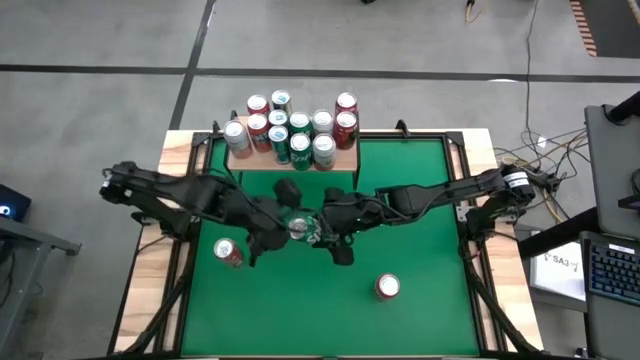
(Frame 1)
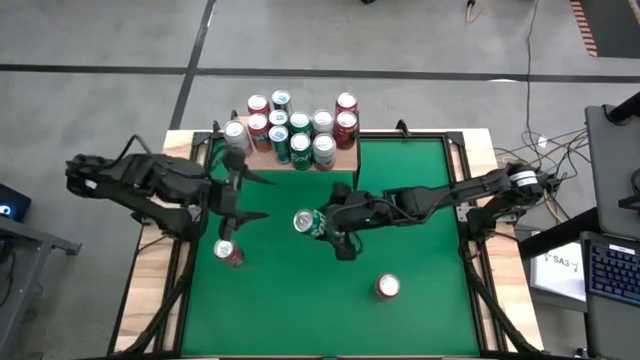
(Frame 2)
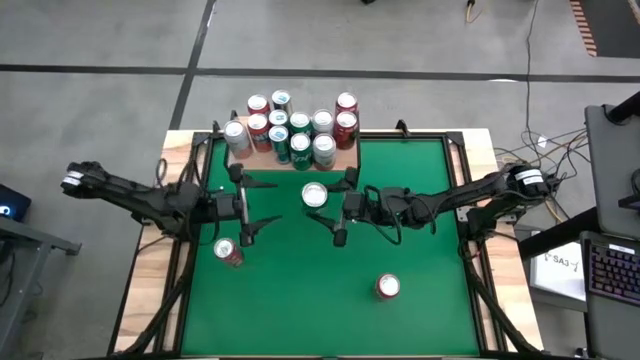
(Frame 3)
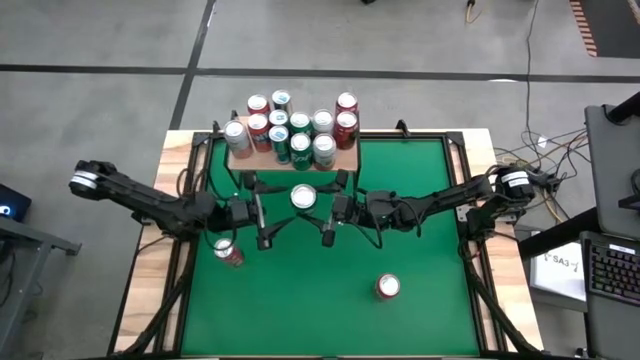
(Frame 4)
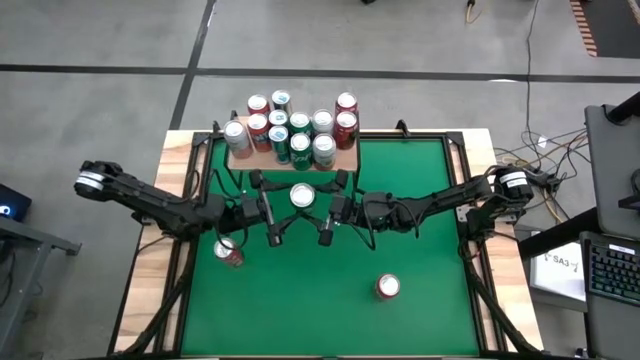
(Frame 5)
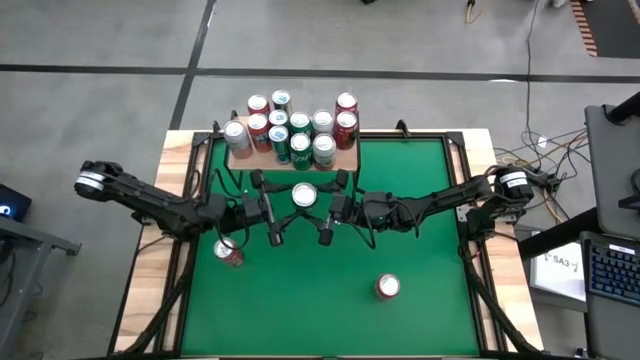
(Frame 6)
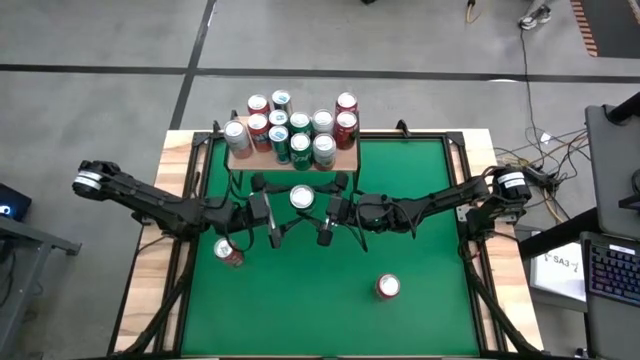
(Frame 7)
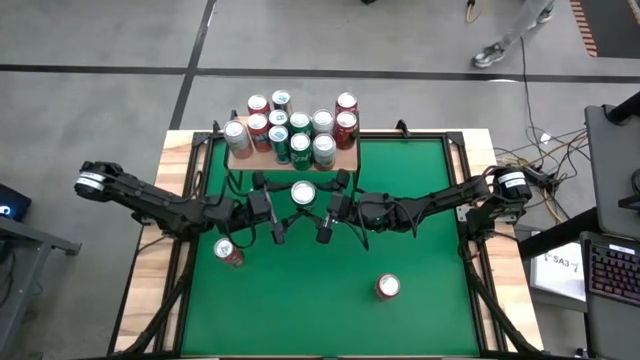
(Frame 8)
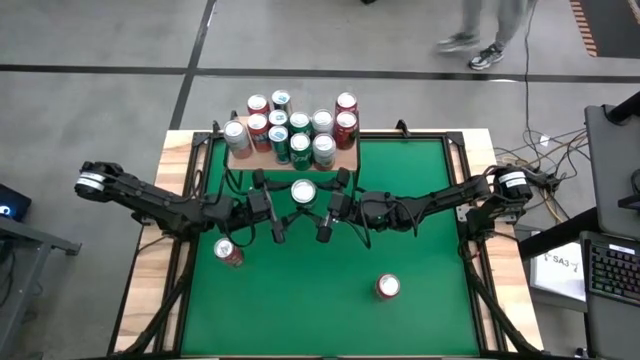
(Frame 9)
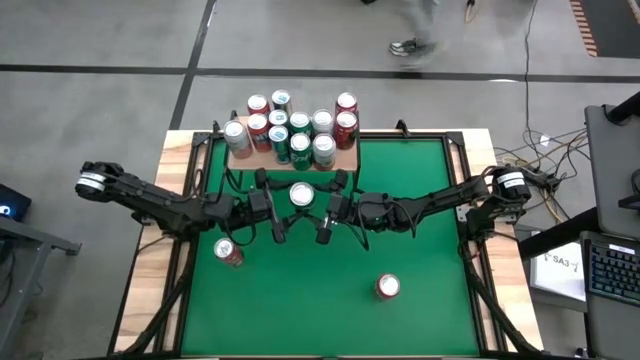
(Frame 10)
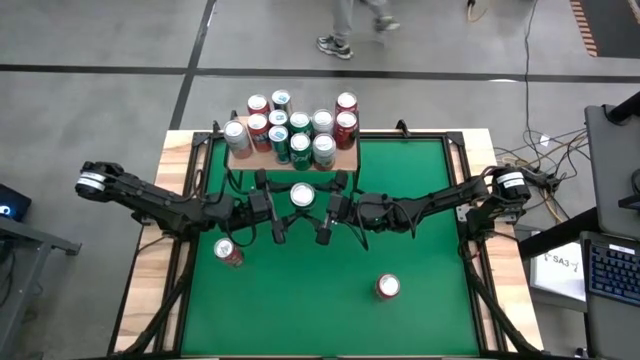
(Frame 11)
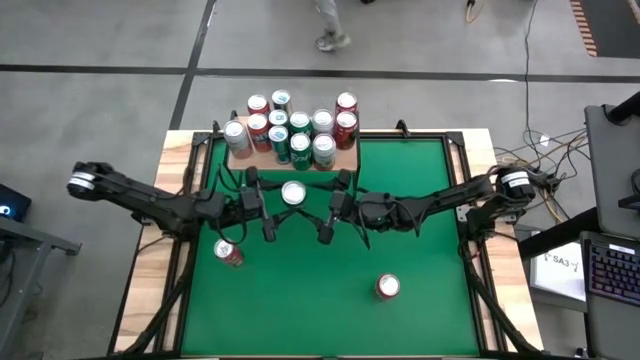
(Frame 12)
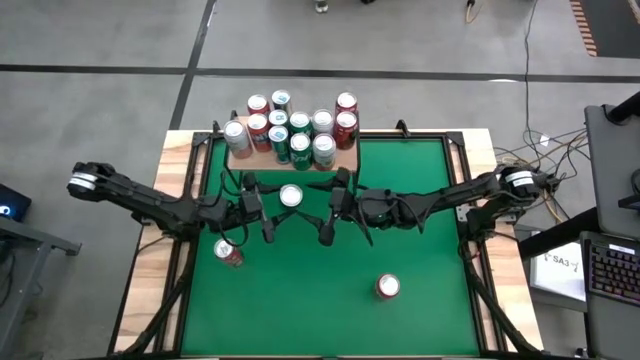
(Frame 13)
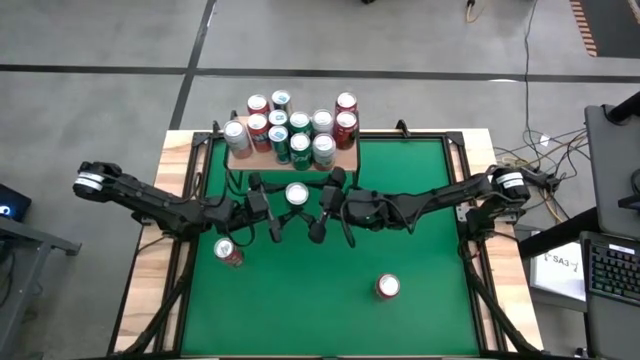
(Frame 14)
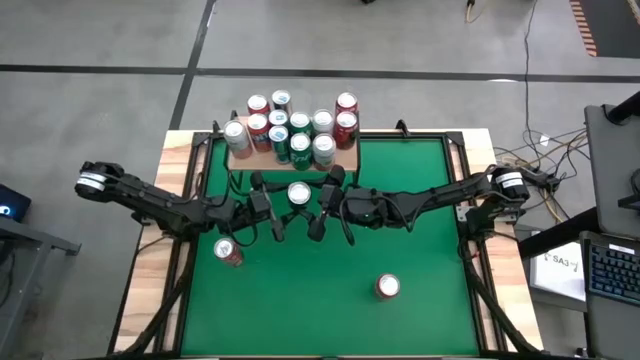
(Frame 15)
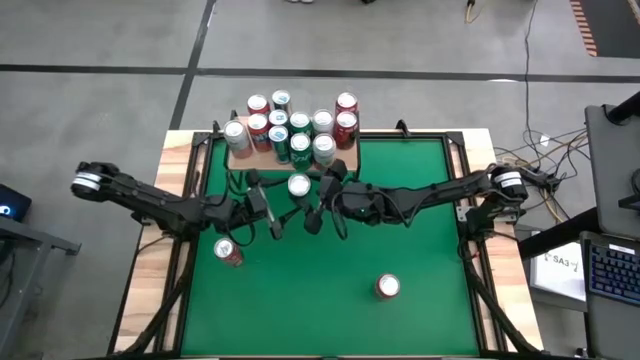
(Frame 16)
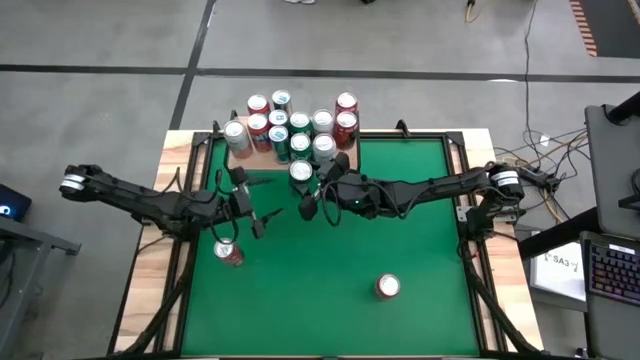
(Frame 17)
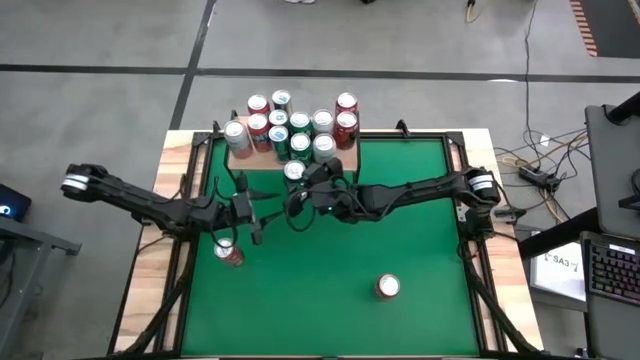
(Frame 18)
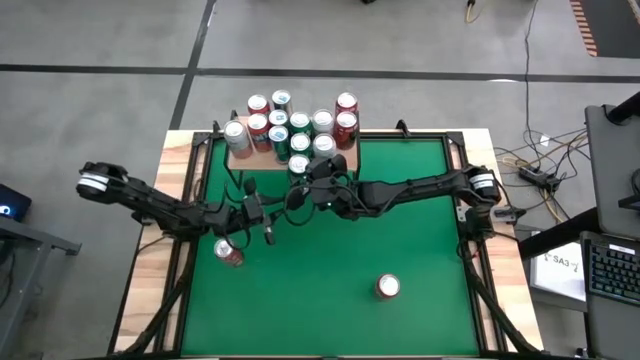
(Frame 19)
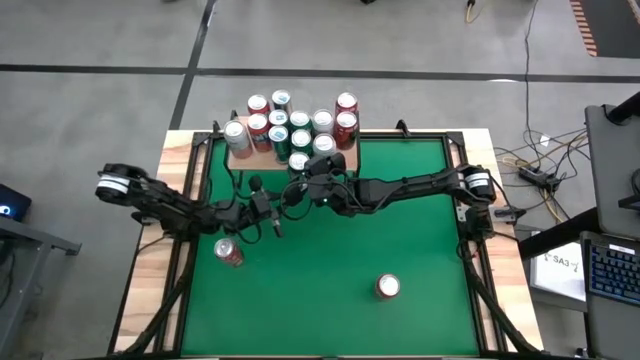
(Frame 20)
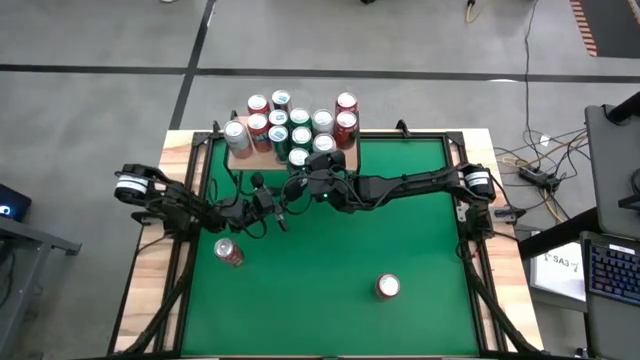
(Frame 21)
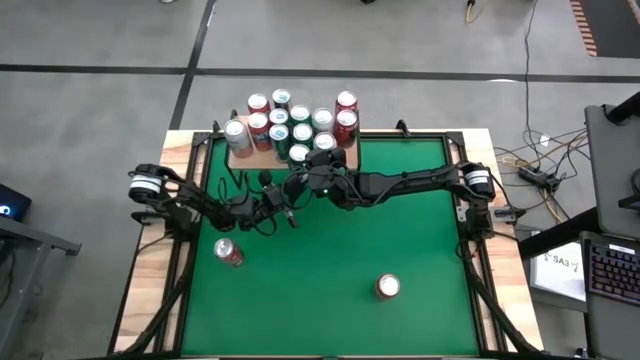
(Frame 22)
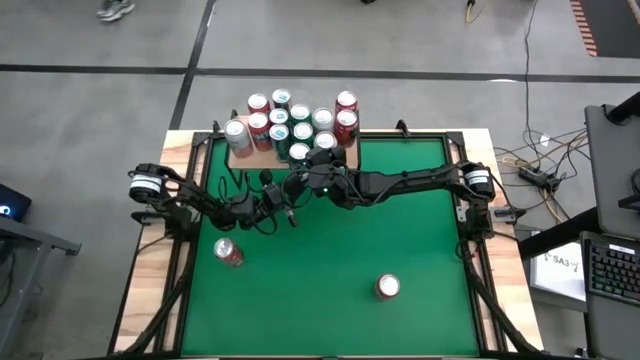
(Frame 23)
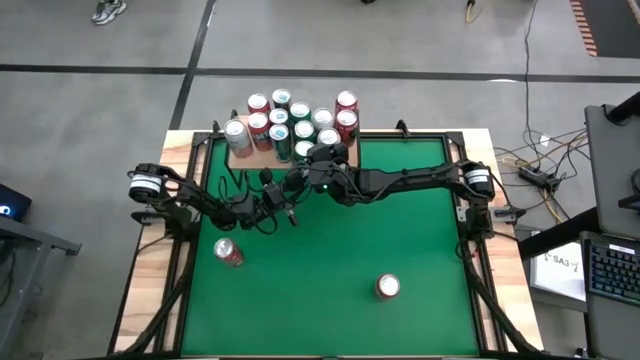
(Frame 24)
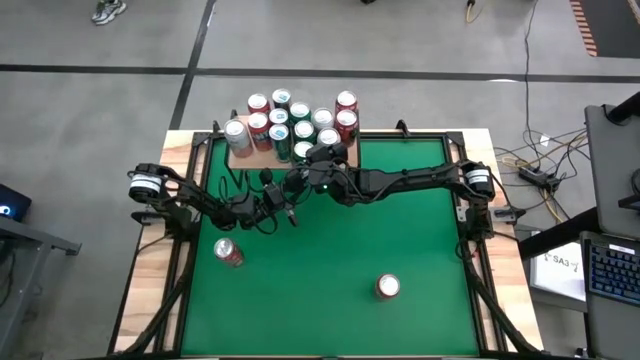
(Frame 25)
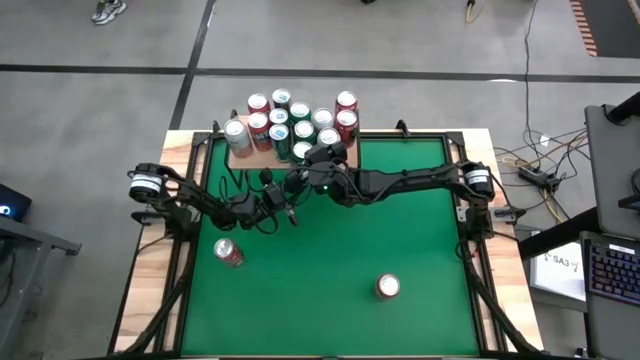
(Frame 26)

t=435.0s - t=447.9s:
Task: Place canned beverage on shelf
Put the green can on the shelf

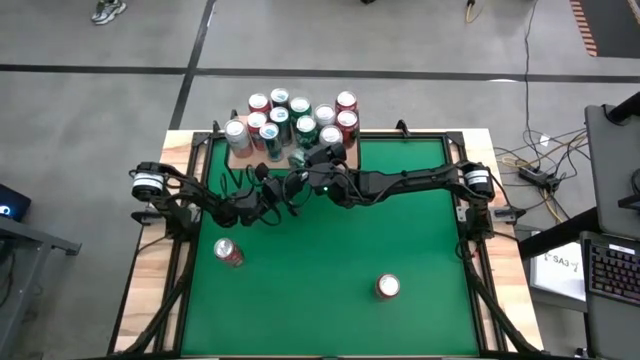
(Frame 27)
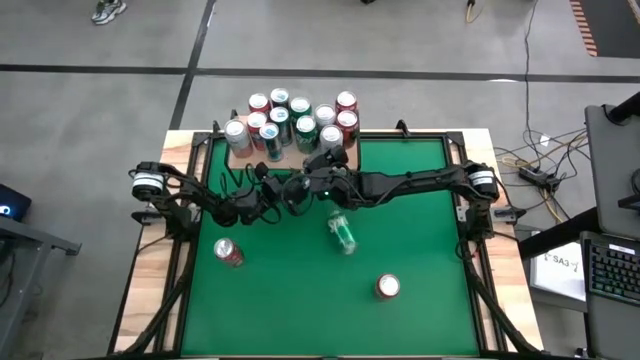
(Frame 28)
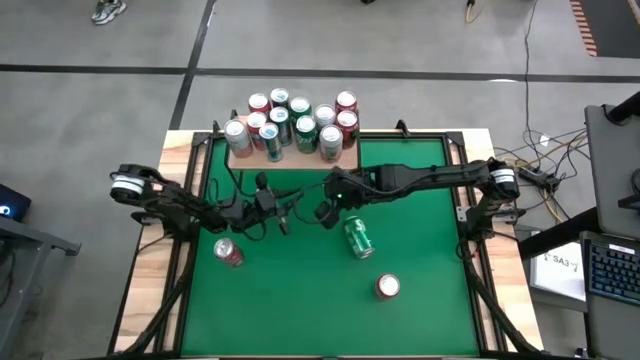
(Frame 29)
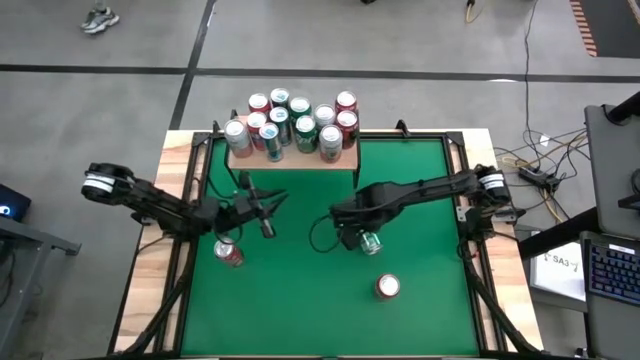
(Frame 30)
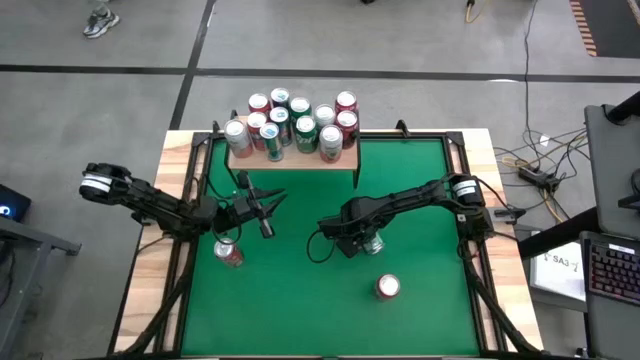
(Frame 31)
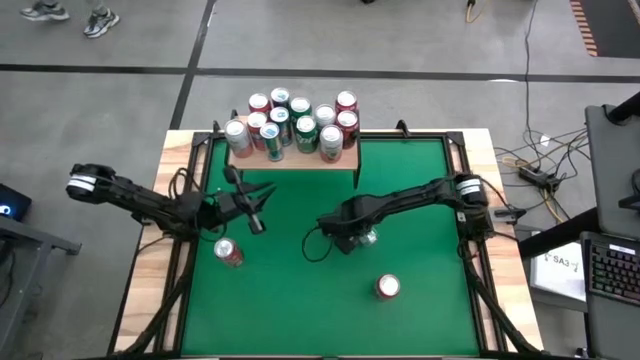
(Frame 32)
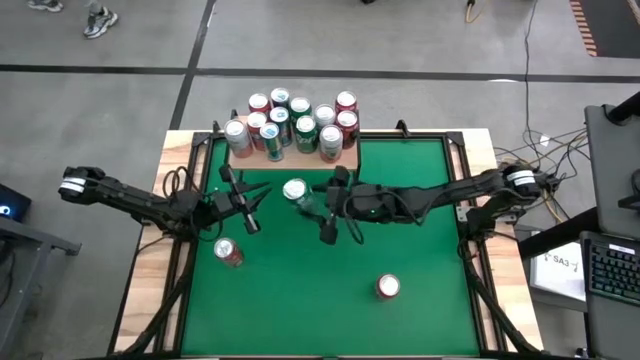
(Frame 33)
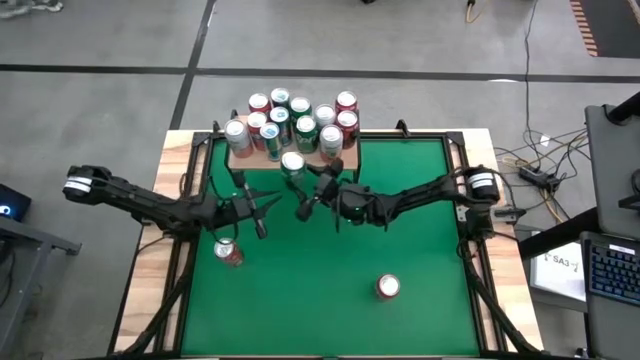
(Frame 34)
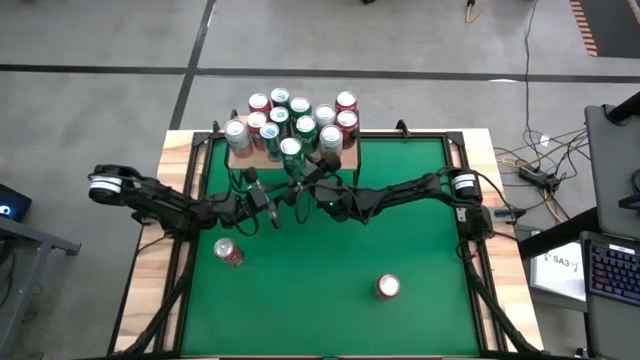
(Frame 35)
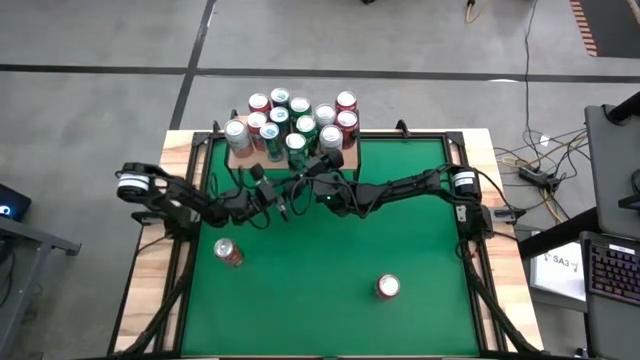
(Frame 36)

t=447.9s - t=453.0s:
Put the green can on the shelf

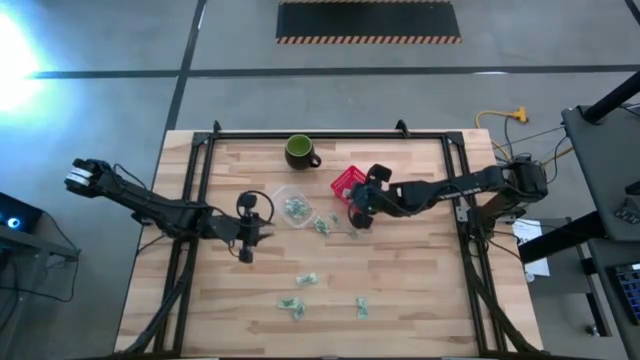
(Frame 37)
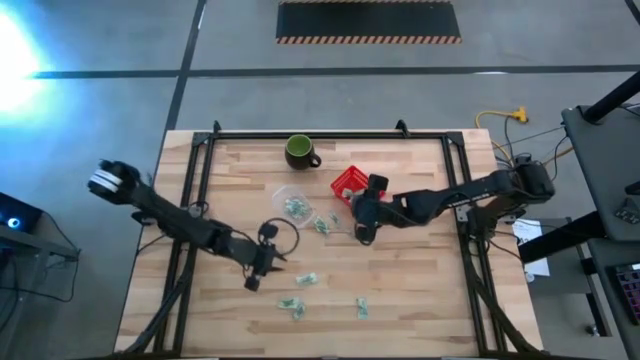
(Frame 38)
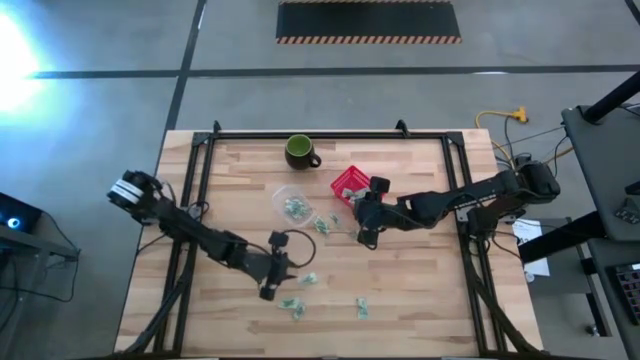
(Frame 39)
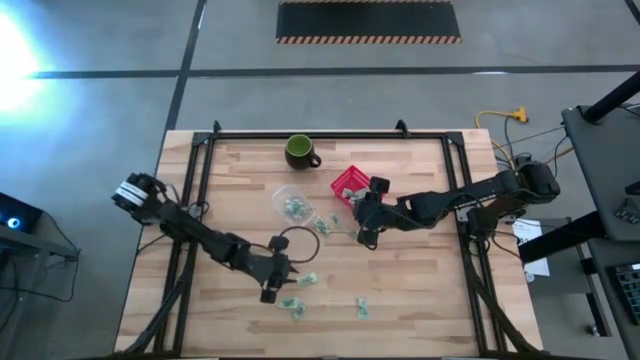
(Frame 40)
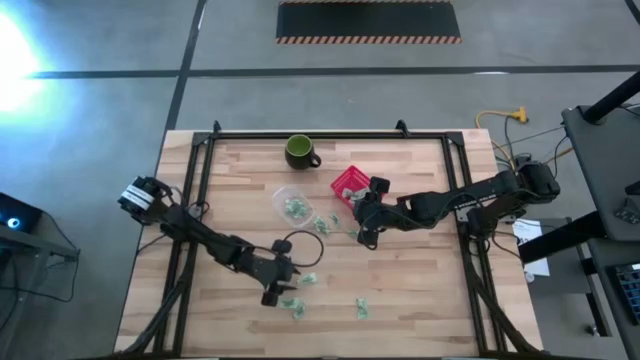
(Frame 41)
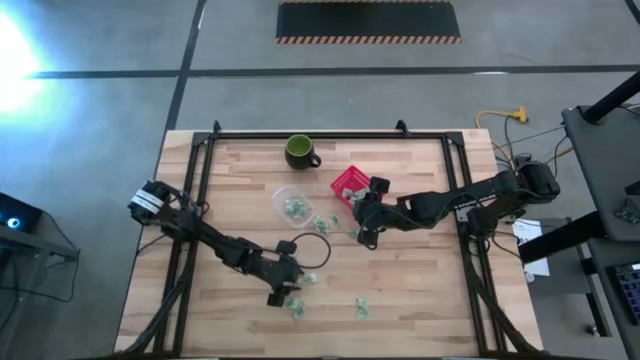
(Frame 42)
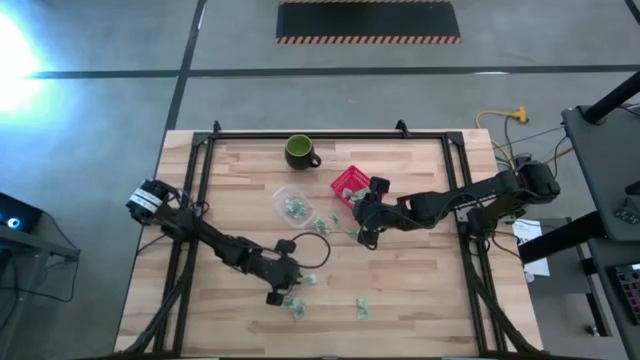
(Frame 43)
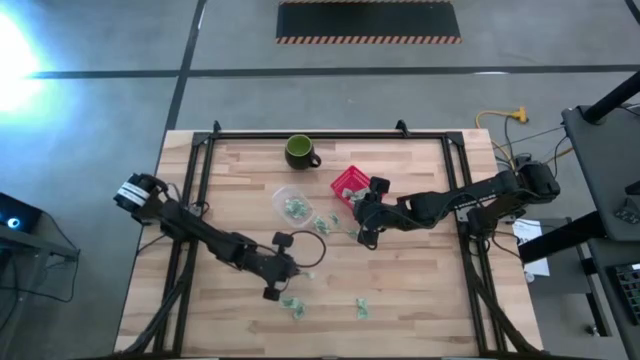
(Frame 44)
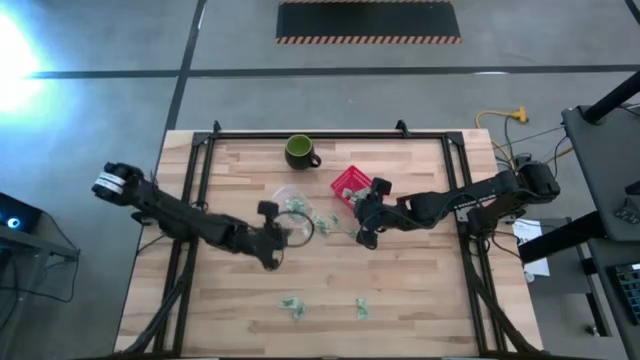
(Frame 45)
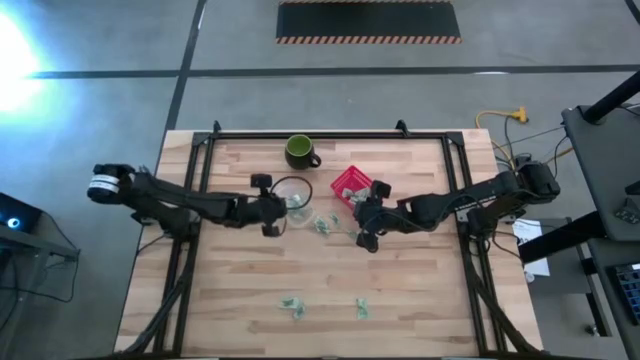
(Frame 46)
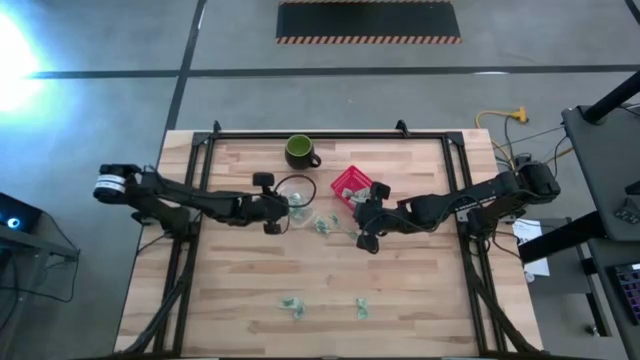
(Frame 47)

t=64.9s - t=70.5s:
Task: Pick and place items into bin
Put the stevia packet into the transparent bin
